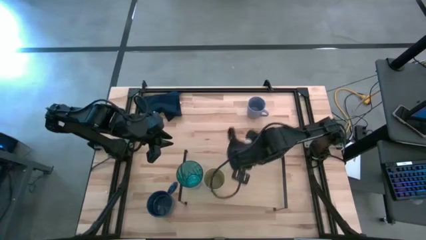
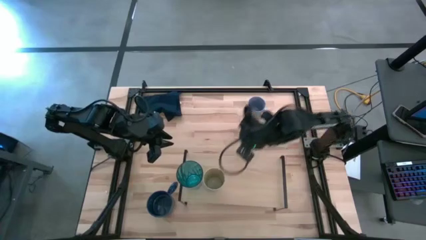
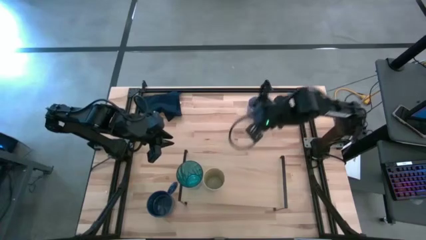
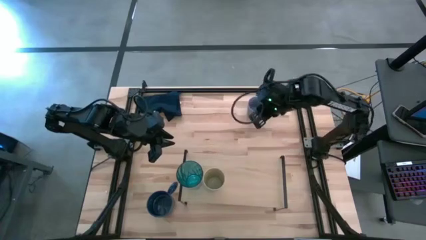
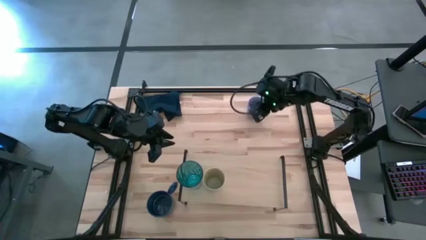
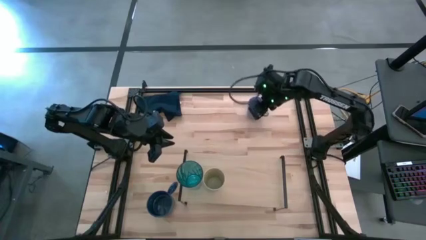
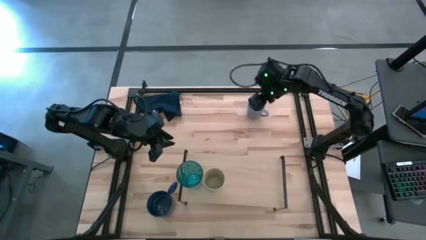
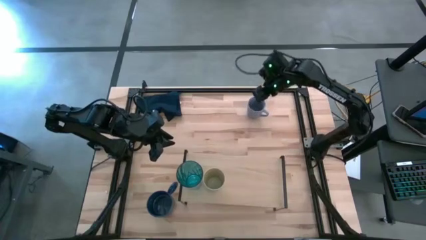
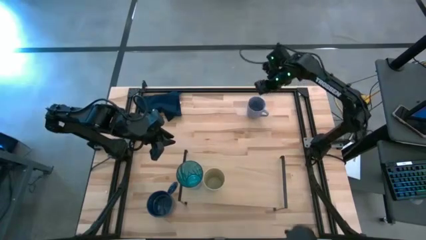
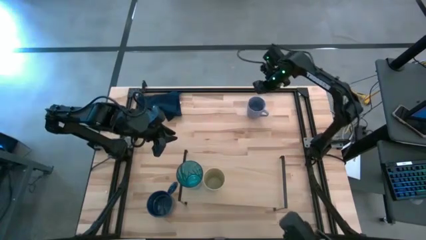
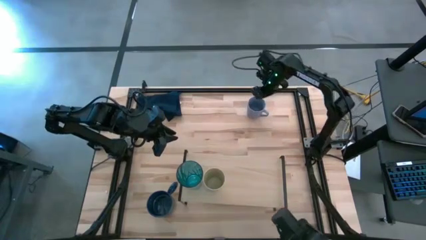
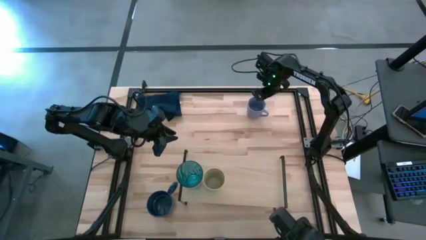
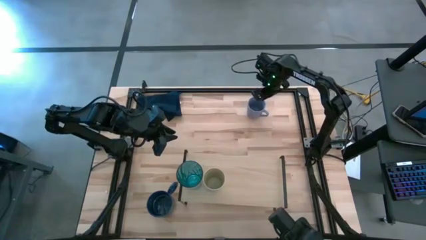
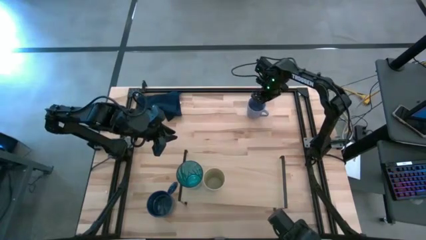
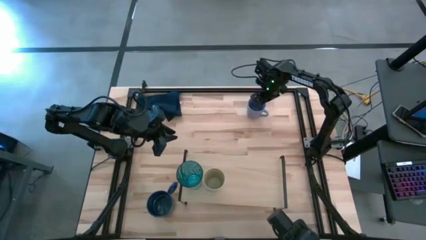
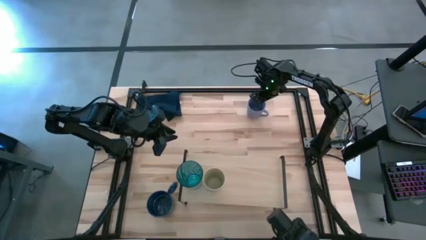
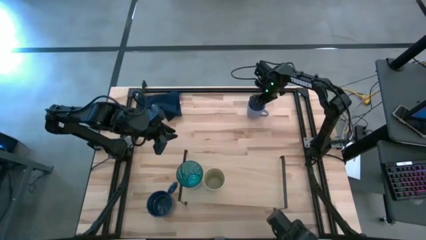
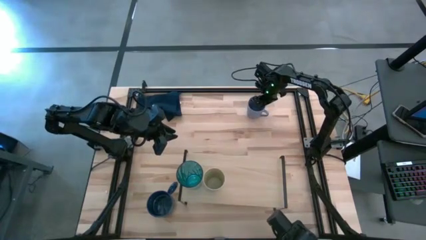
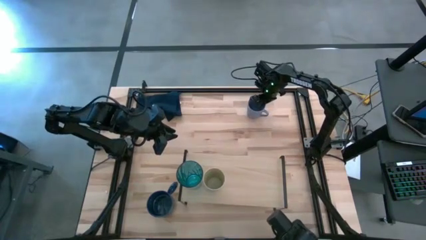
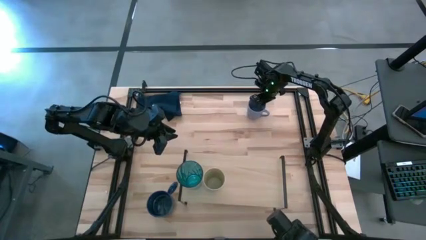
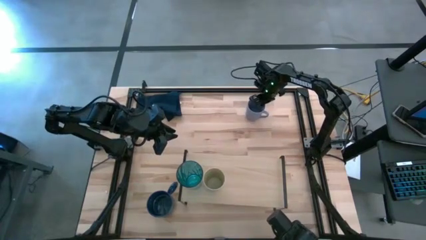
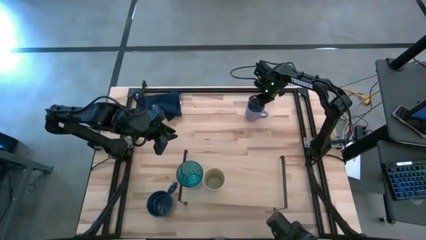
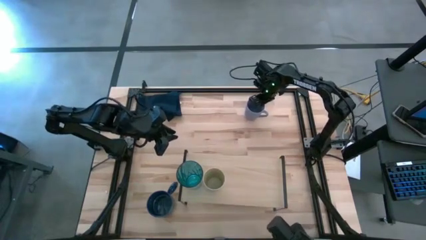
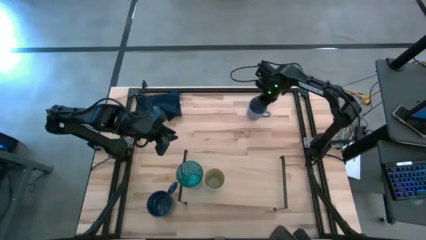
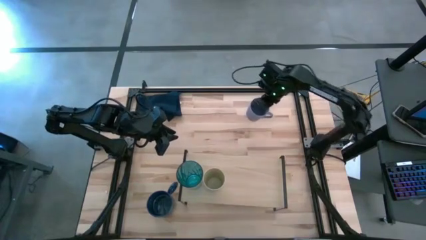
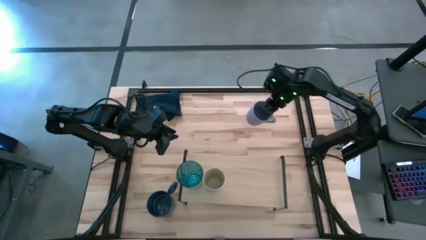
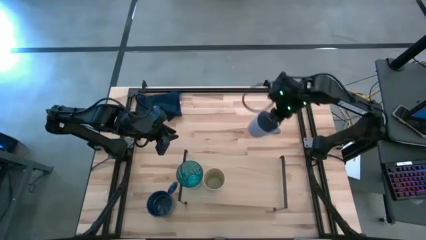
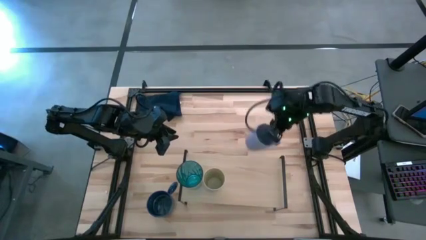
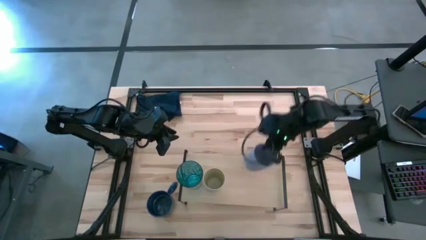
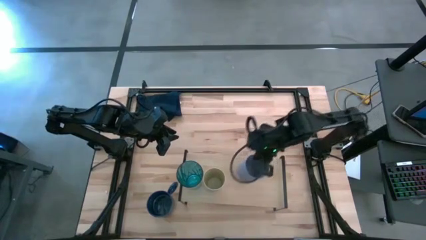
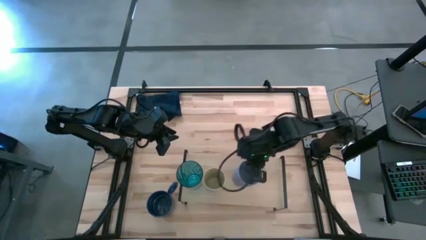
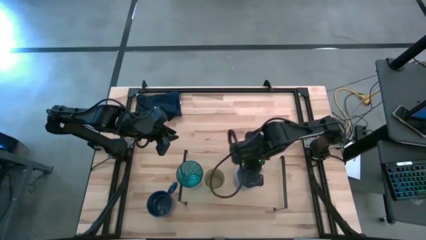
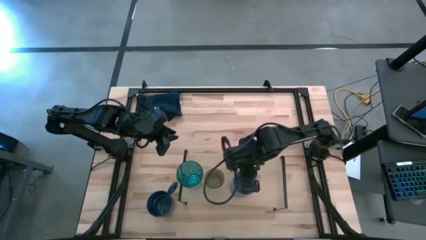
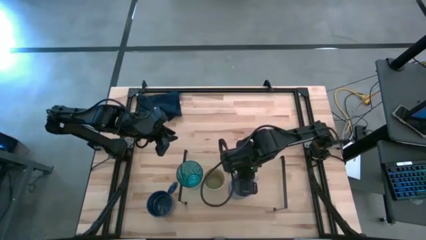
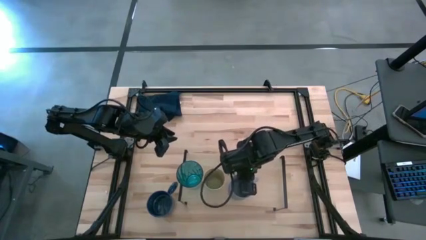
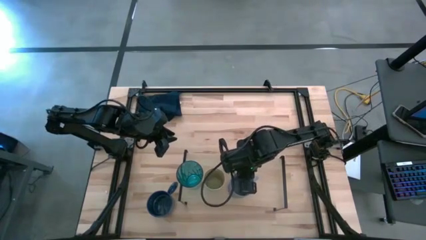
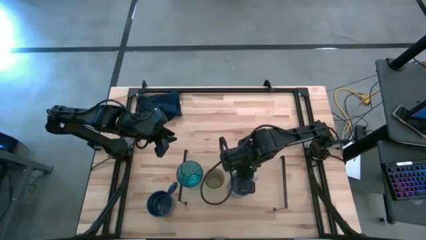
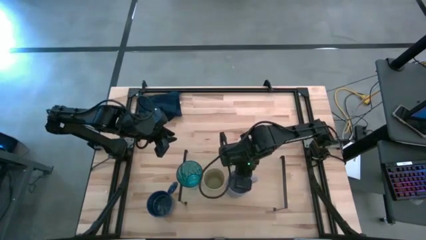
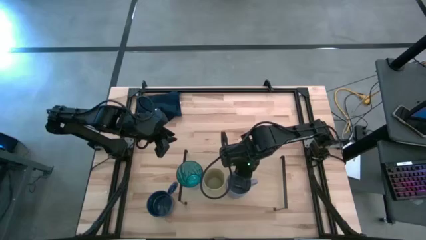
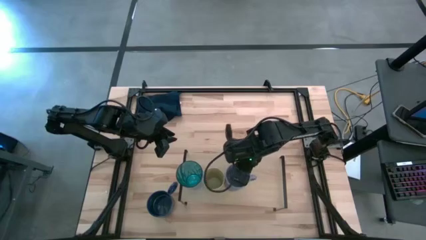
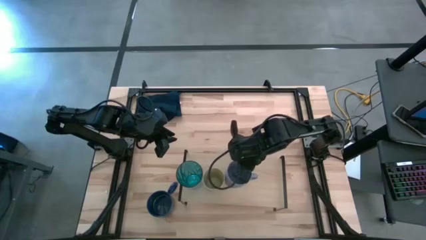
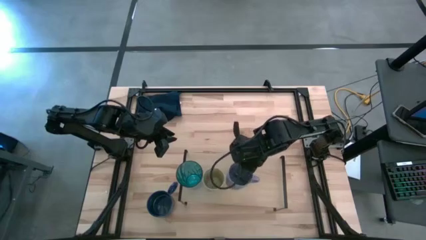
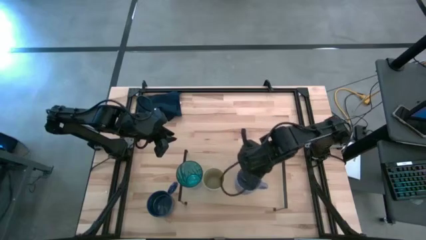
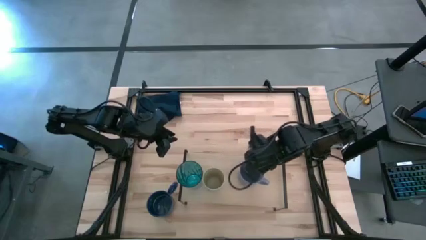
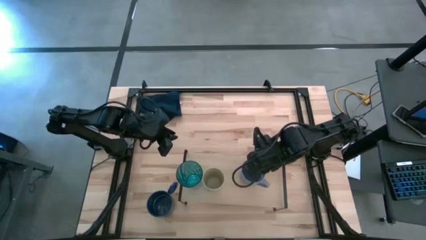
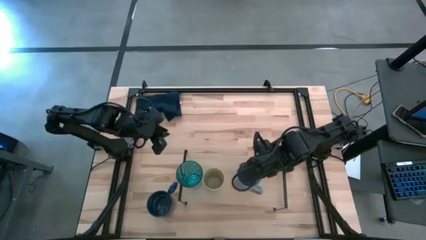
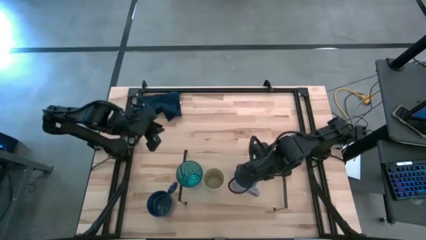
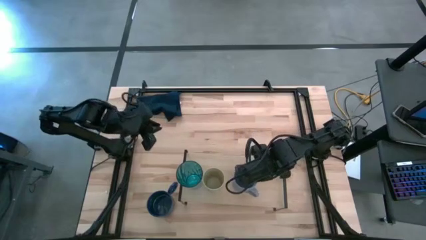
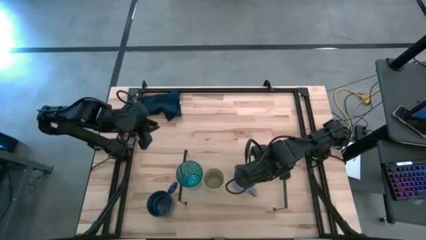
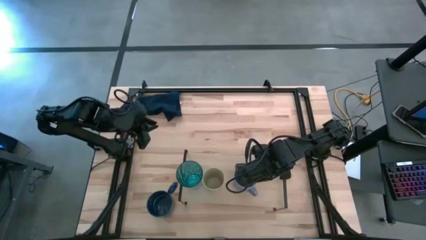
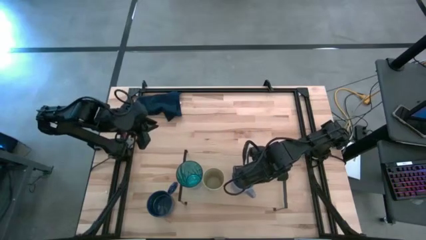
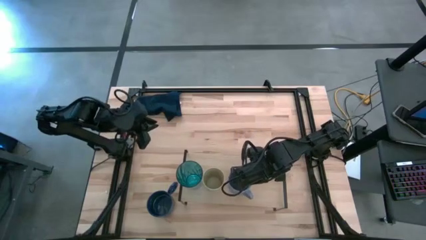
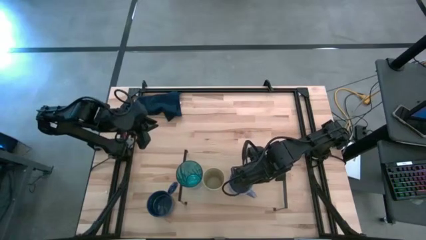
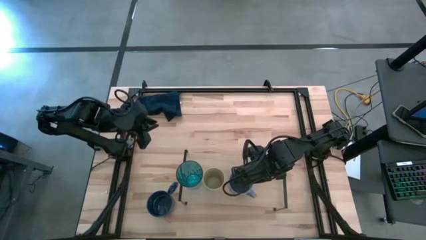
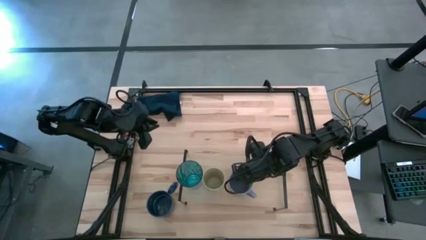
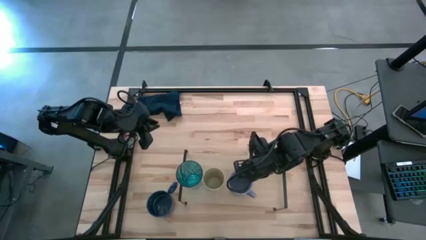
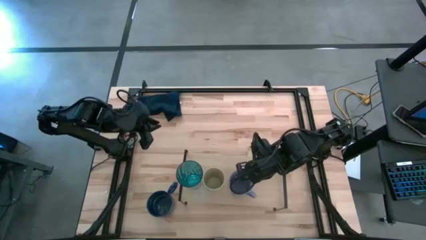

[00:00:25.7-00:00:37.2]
Task: Stack small to large cups/mugs on shelf
Put the blue mug on the shelf

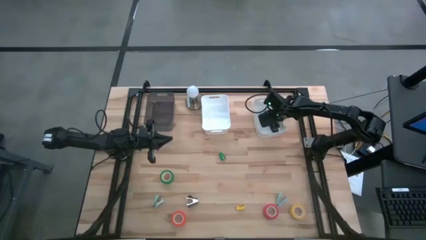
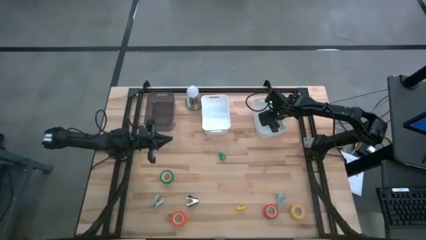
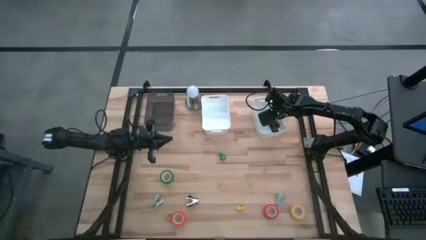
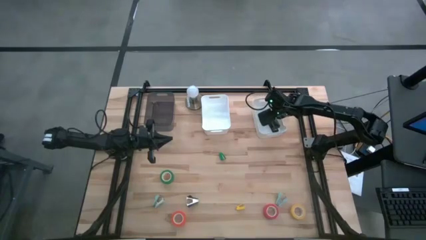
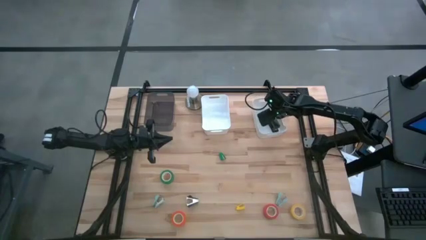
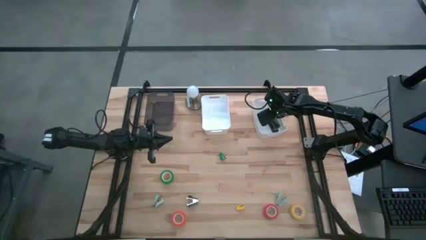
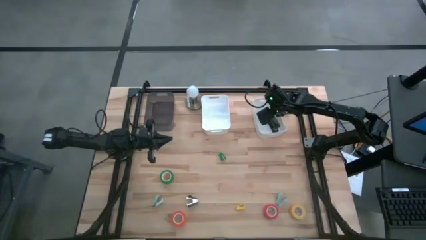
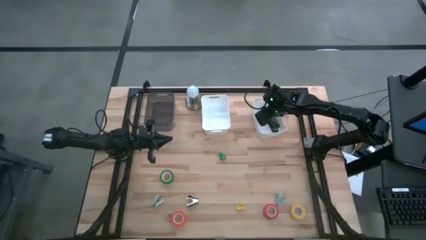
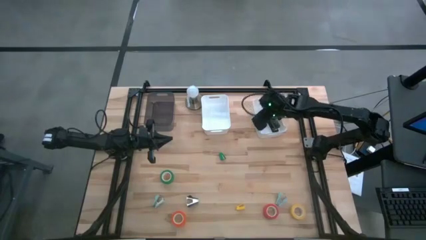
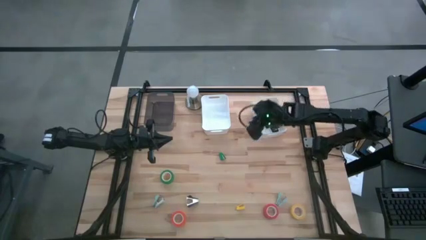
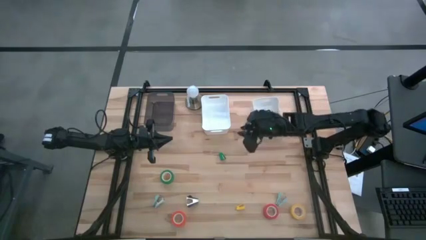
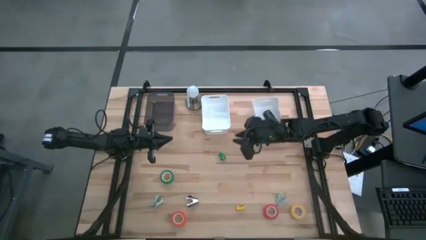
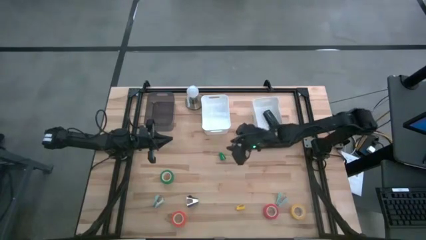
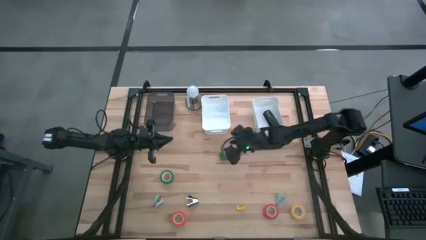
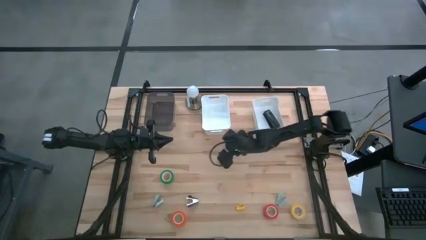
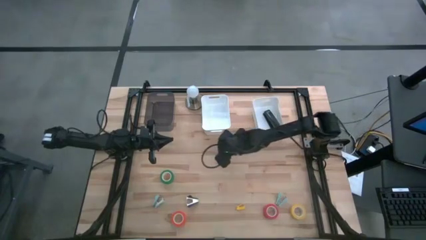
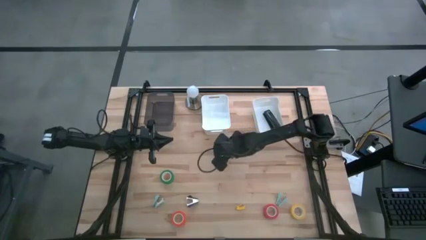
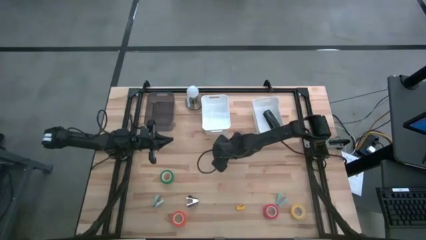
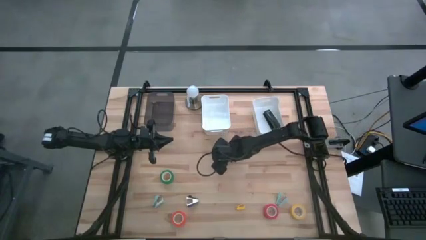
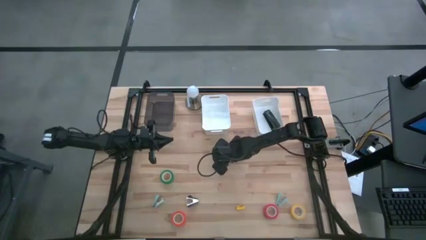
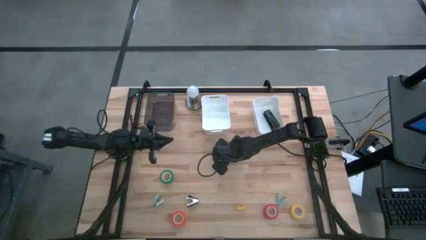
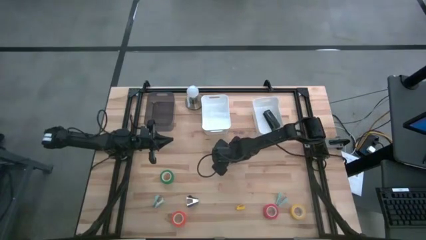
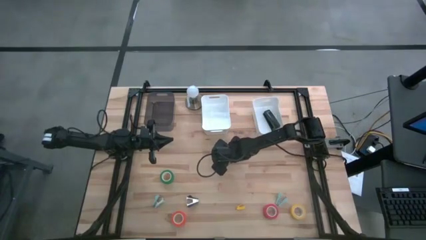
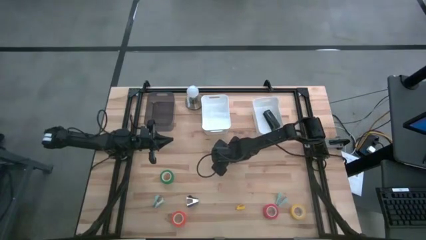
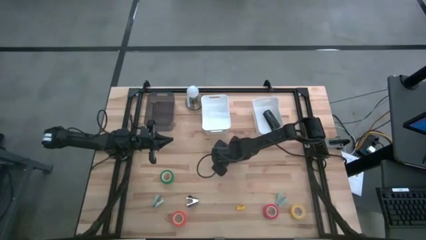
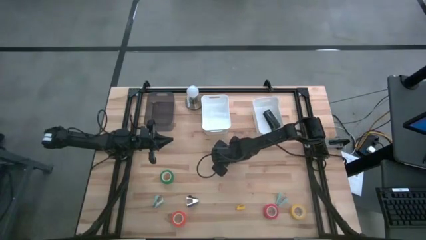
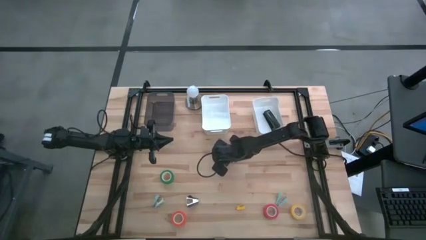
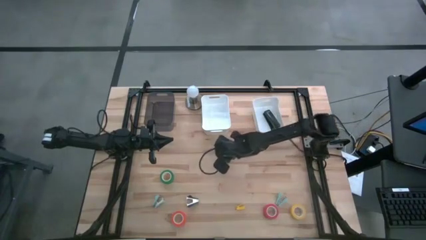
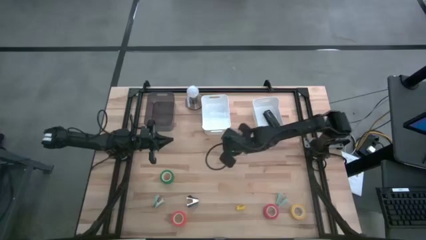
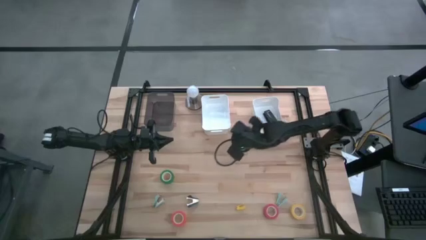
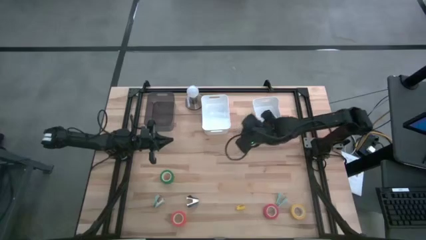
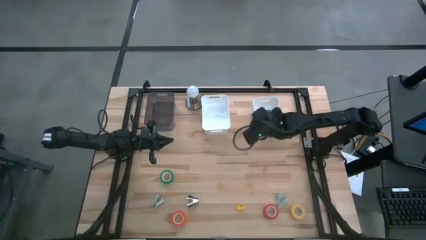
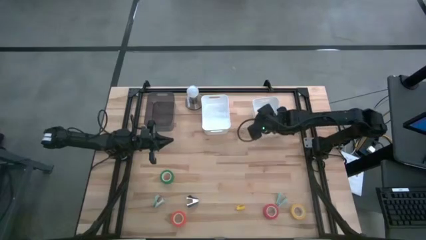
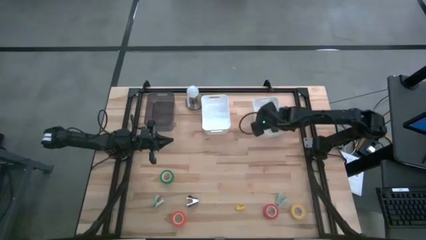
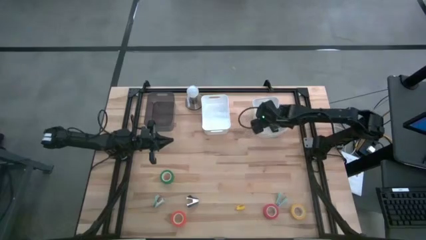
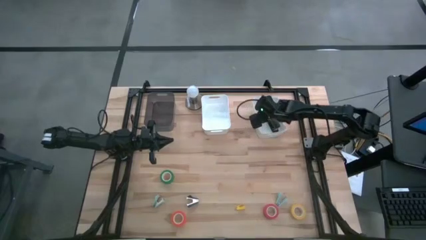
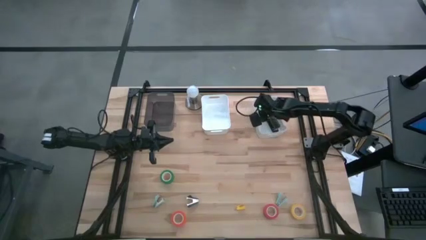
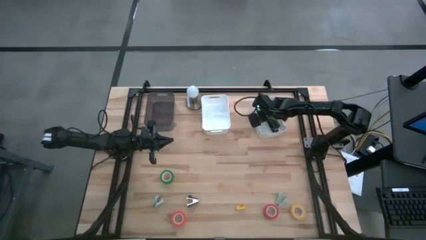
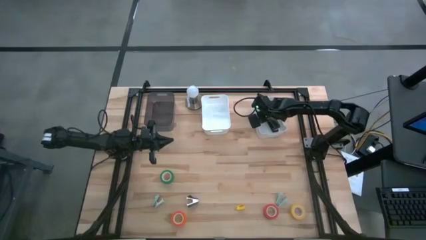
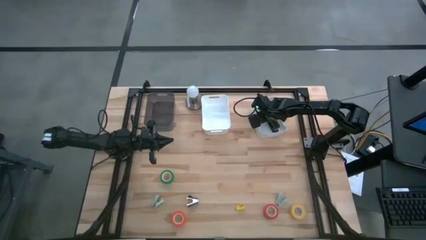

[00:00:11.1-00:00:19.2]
Task: Pick and place Stapler, Stapler remover, tape
Put the green stapler into the right white bin
